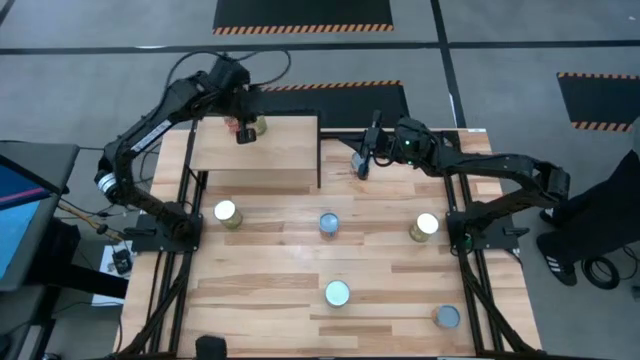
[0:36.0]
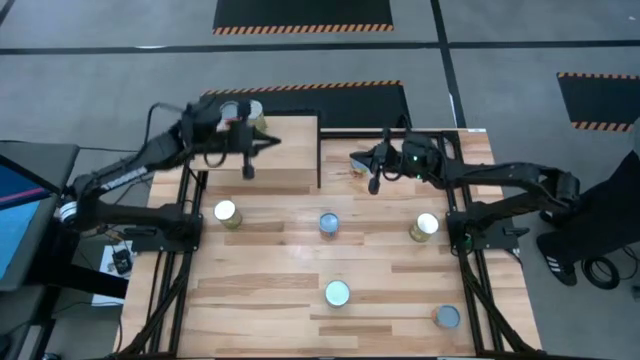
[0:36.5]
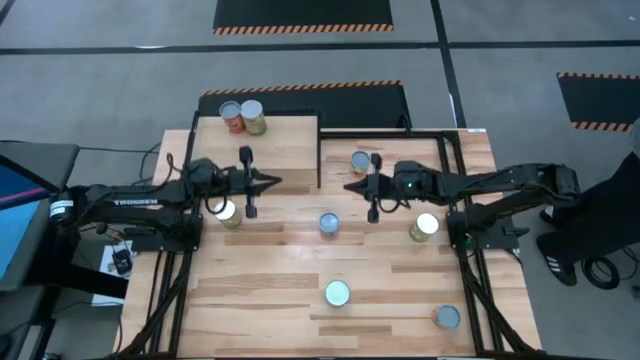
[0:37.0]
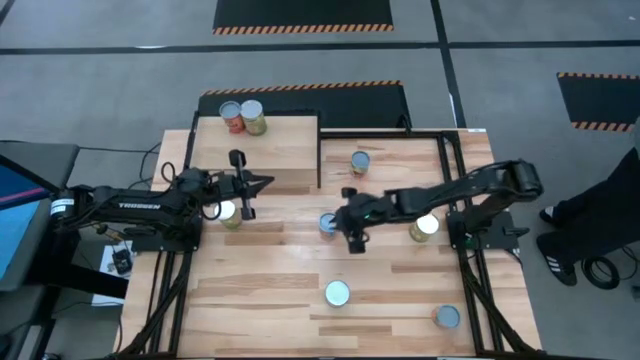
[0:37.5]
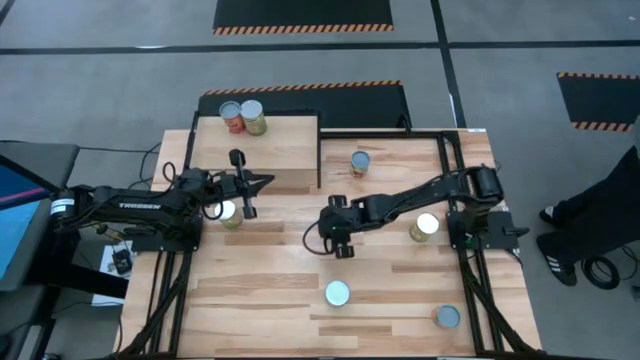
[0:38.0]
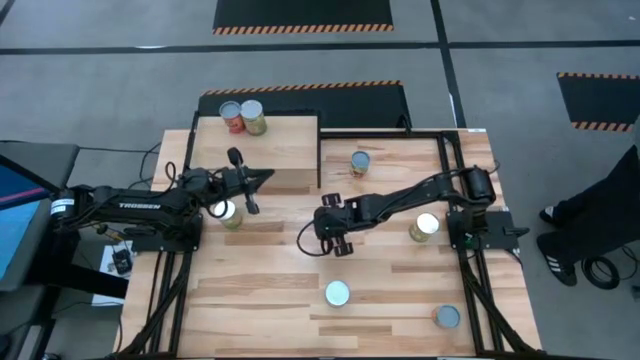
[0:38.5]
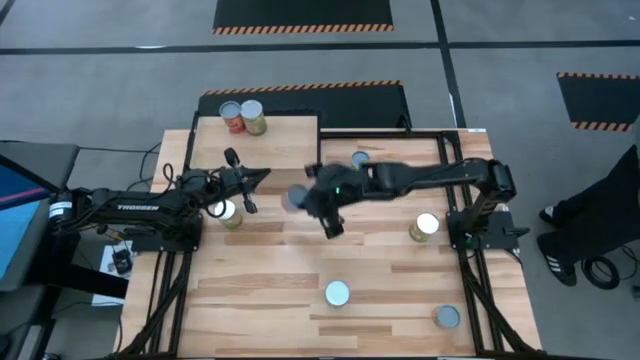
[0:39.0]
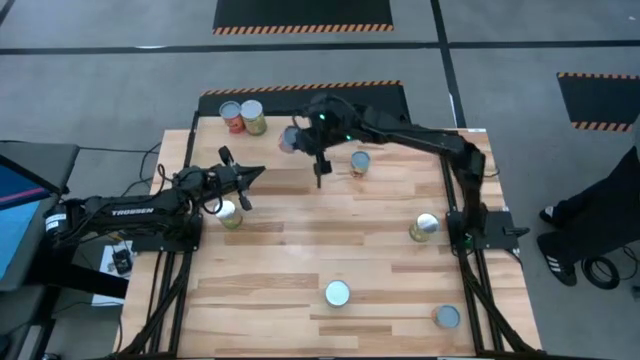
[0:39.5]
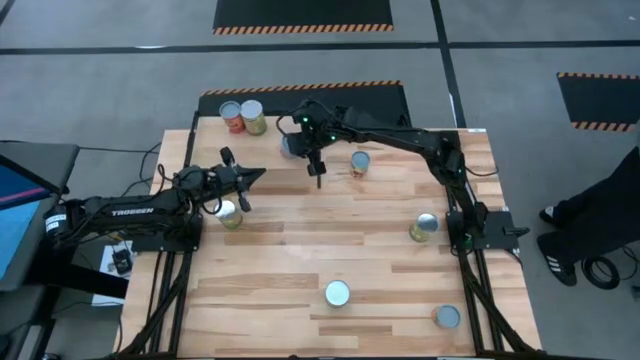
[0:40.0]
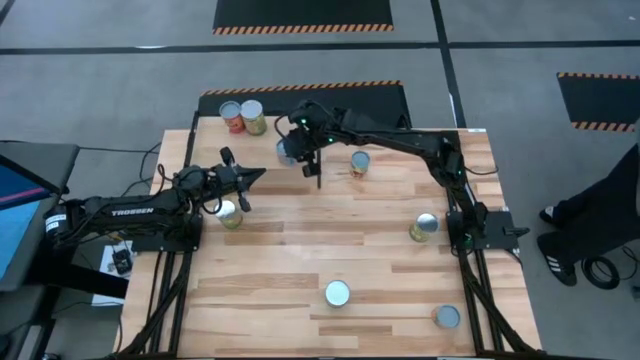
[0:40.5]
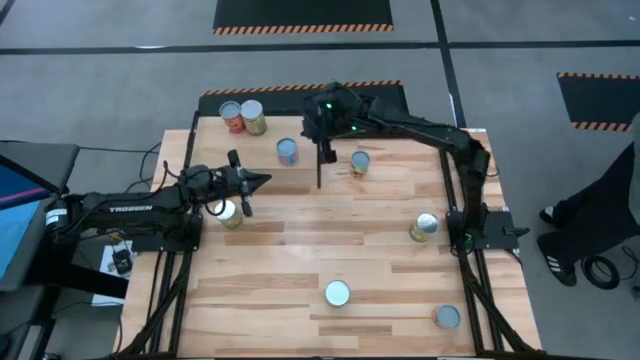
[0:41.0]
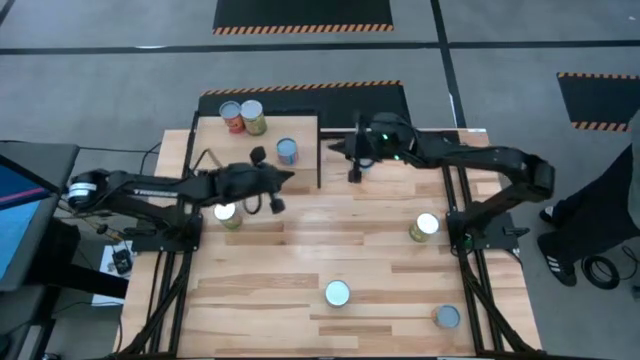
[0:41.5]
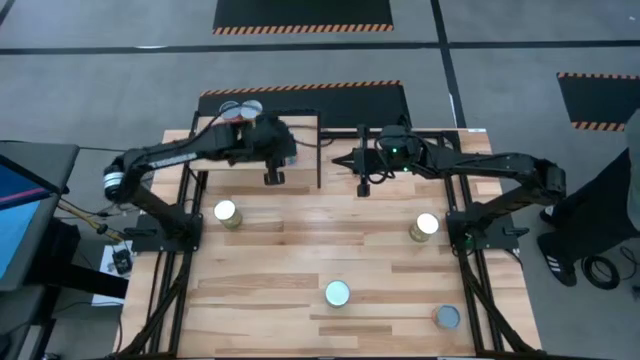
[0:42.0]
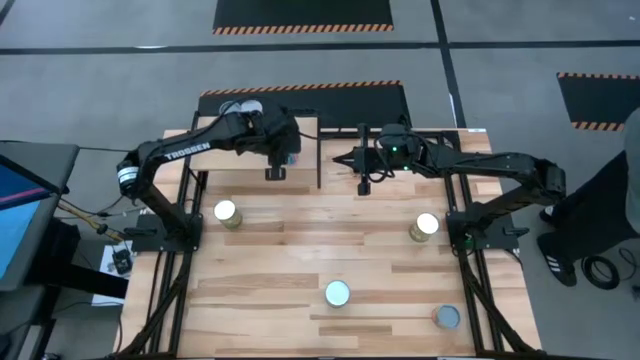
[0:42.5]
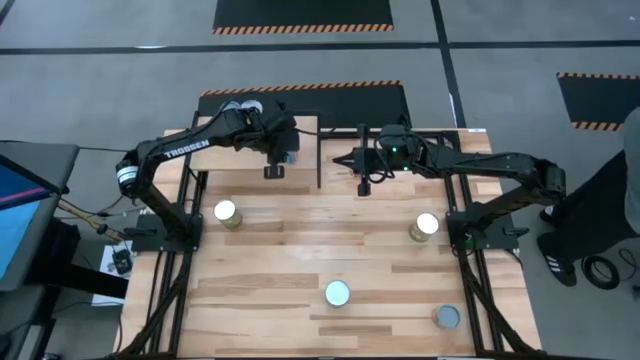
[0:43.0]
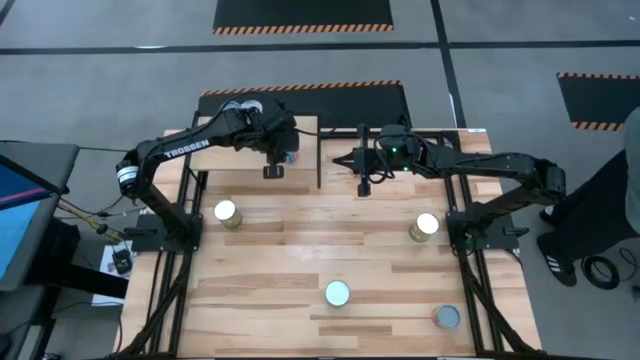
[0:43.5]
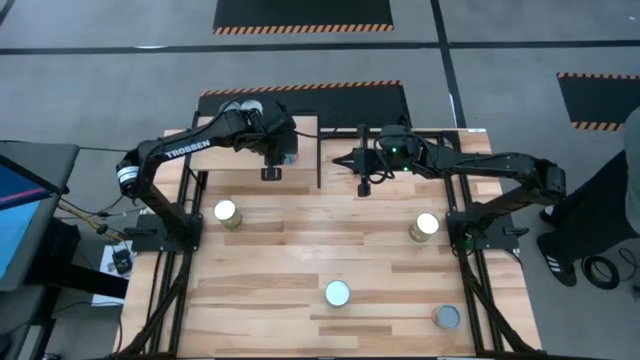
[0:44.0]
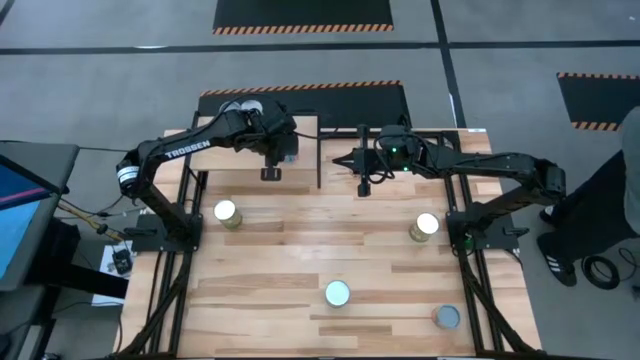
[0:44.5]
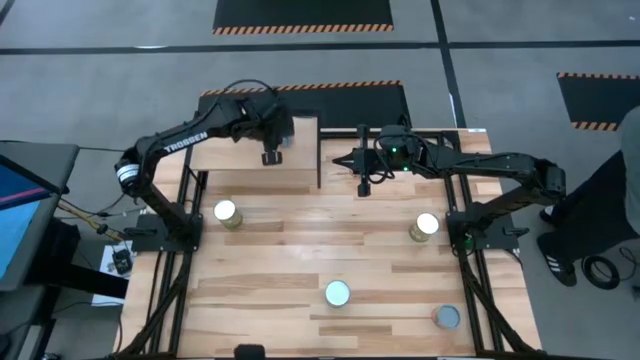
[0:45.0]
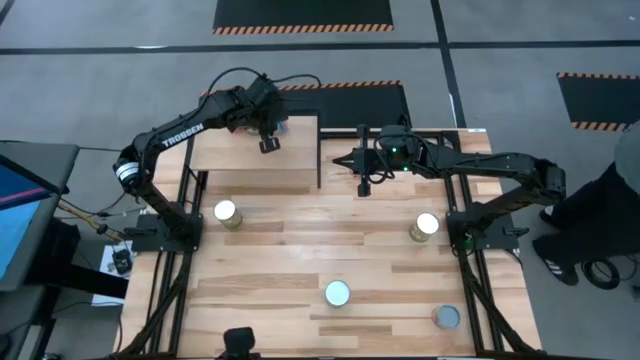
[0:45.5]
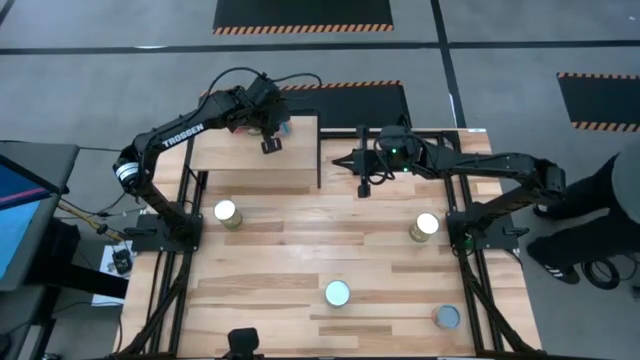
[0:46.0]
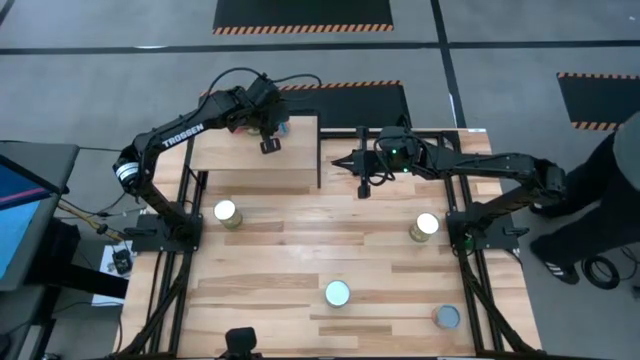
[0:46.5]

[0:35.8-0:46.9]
Task: Pick and place cans onto a shelf
Put the canned mixed corn on the shelf

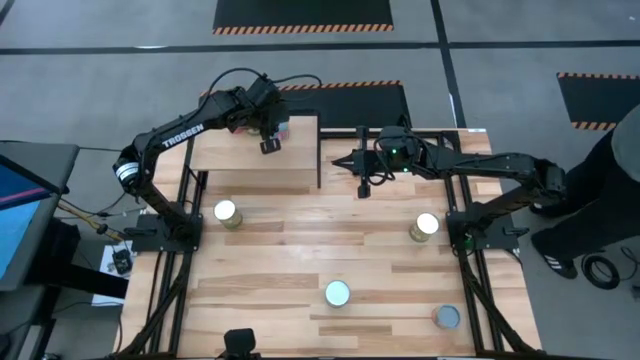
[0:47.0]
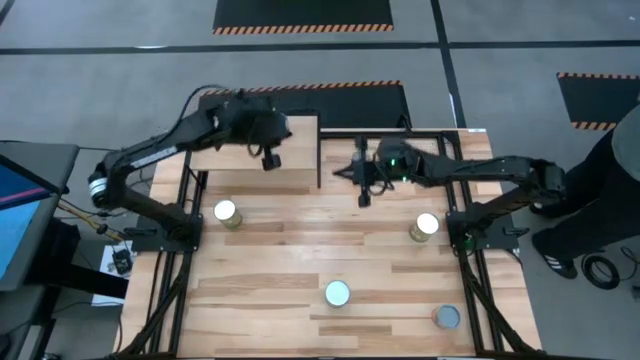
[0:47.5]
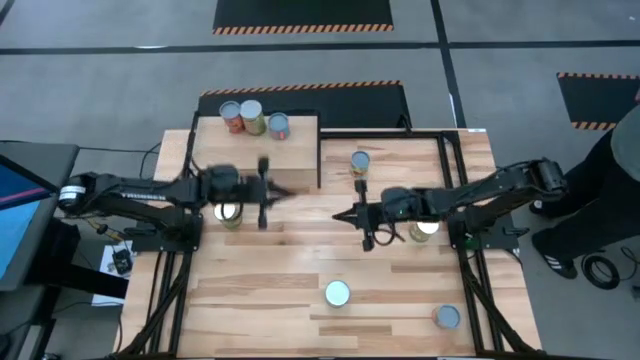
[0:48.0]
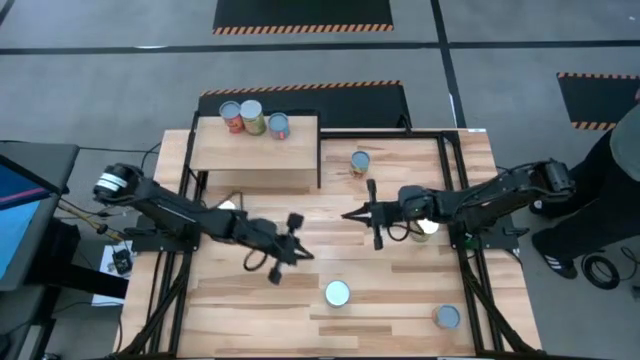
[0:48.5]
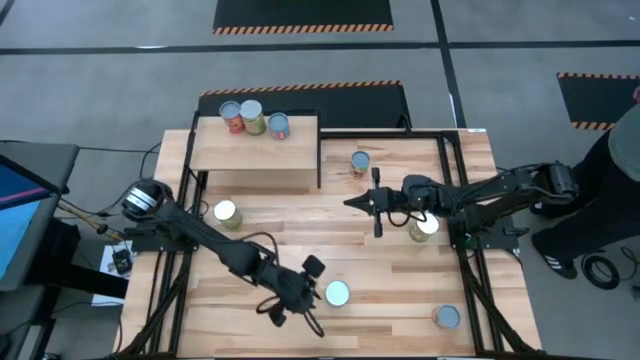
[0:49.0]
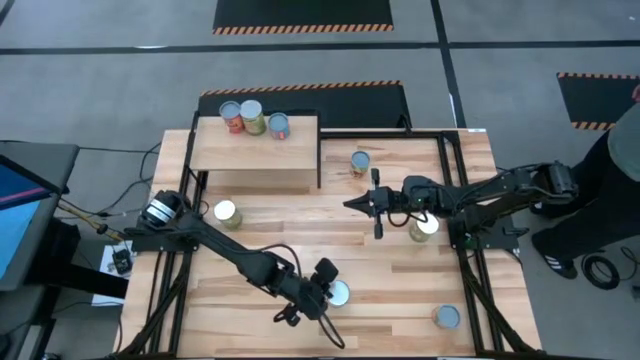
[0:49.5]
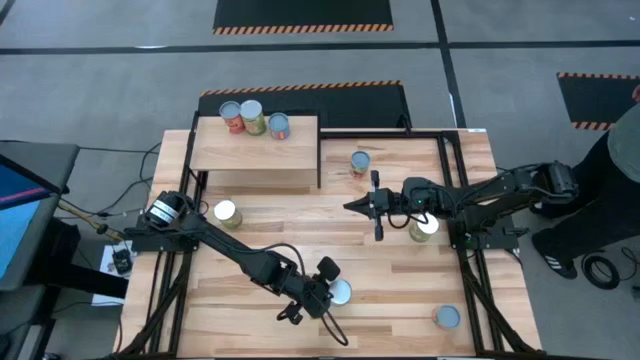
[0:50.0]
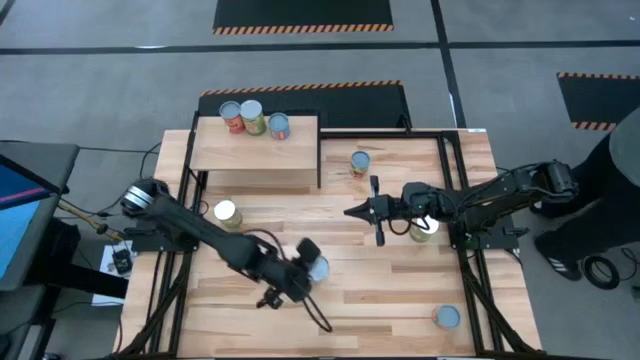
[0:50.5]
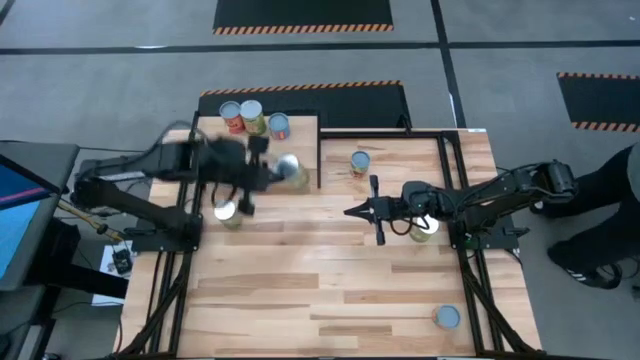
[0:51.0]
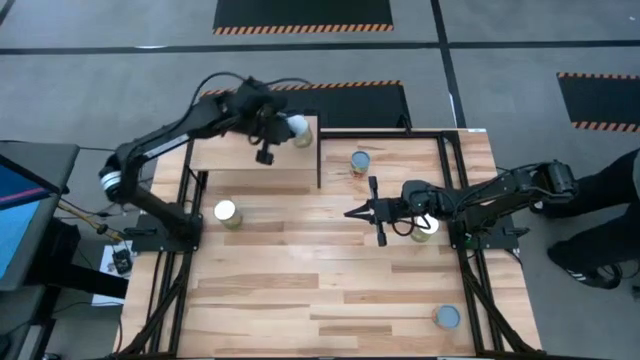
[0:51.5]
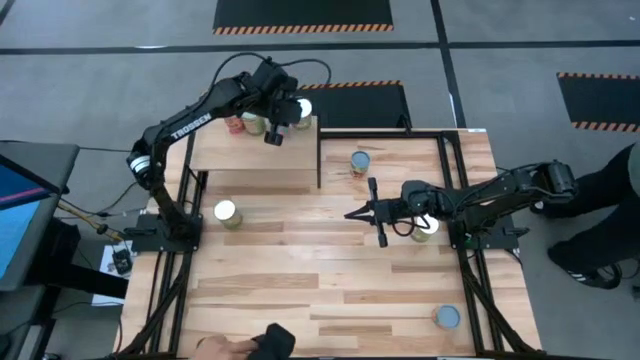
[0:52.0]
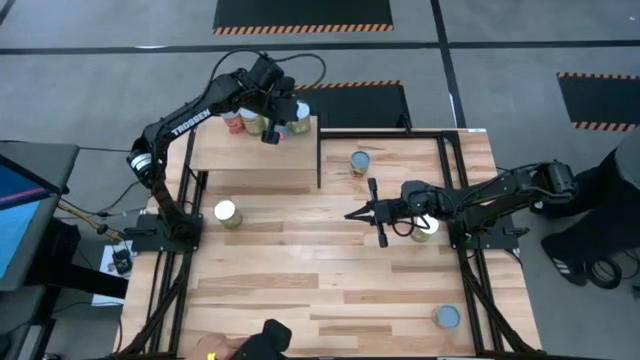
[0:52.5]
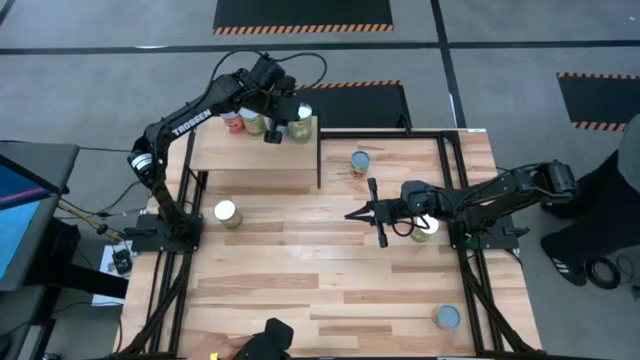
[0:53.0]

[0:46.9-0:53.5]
Put the bottom canned pears on the shelf

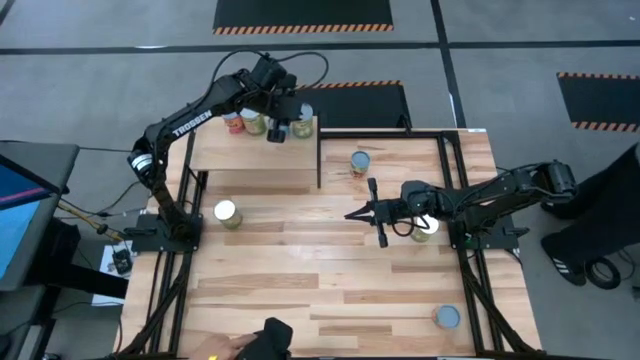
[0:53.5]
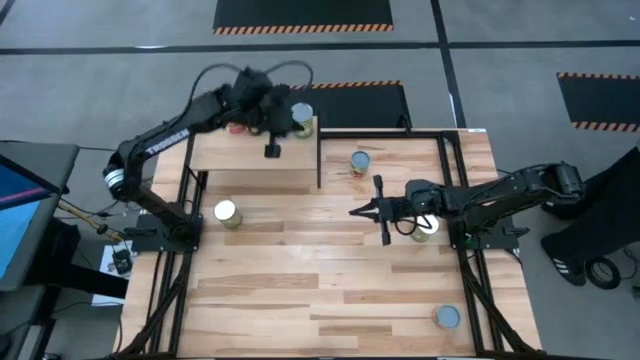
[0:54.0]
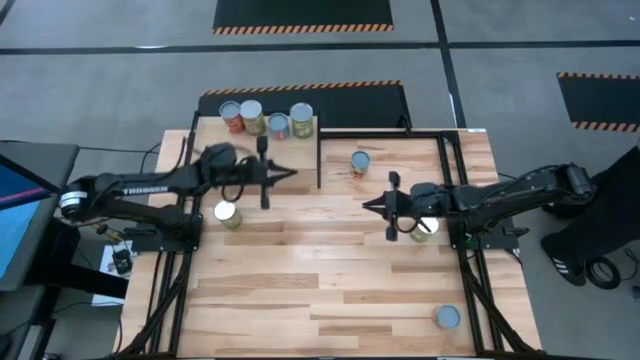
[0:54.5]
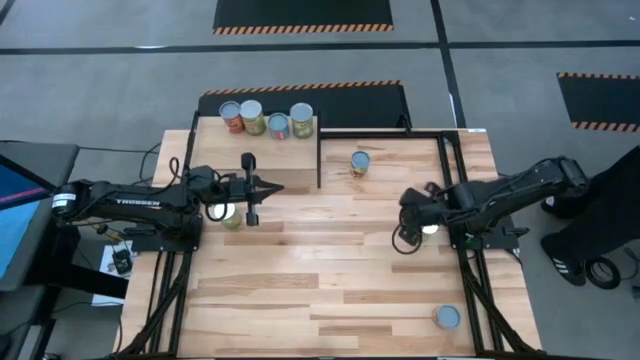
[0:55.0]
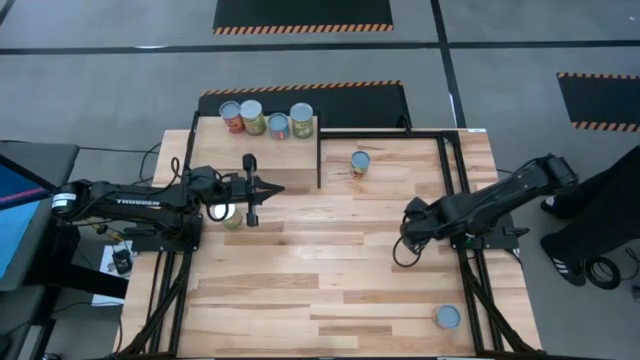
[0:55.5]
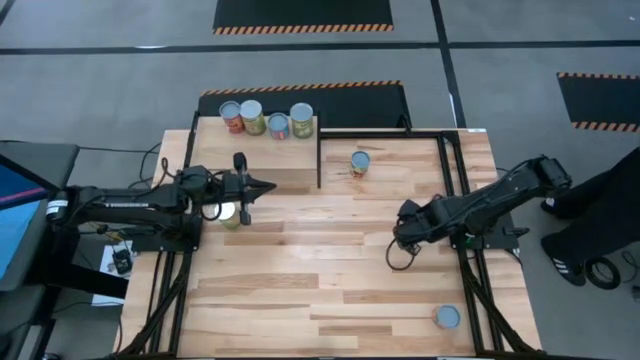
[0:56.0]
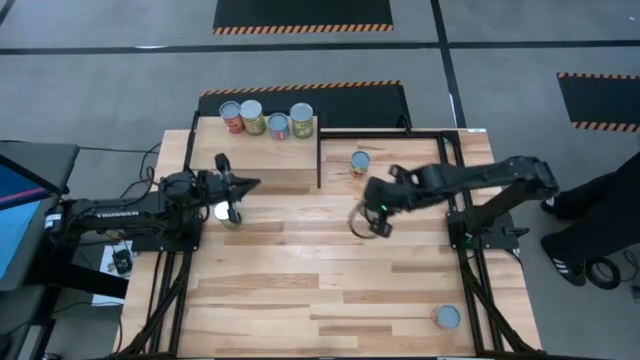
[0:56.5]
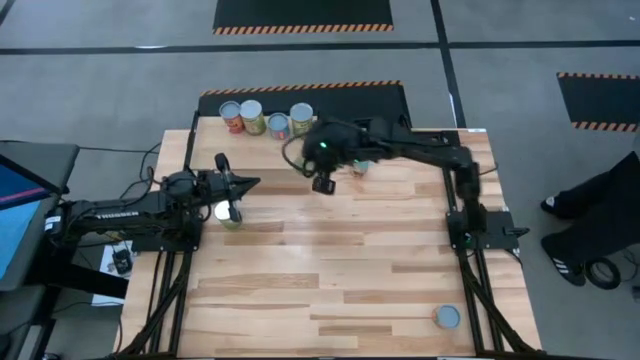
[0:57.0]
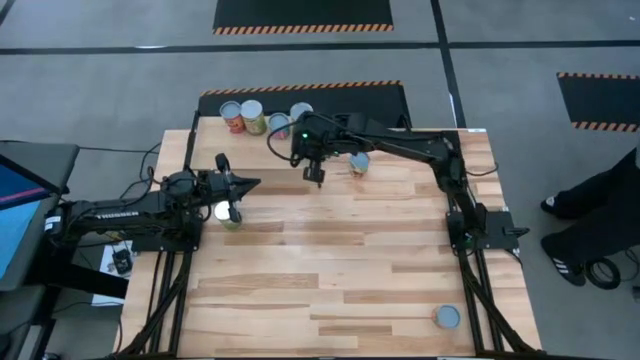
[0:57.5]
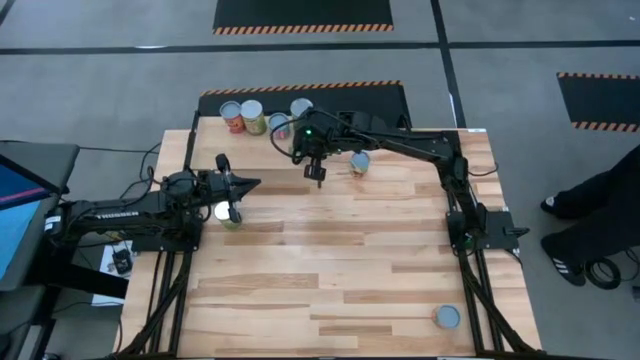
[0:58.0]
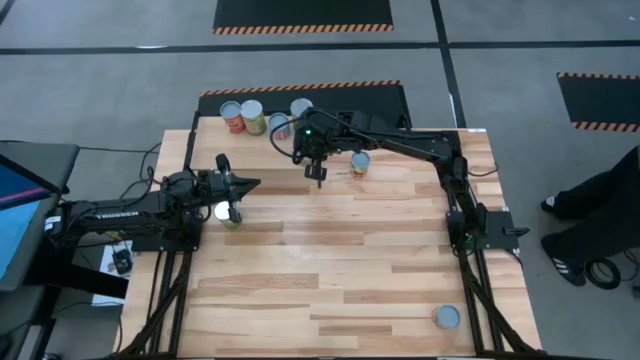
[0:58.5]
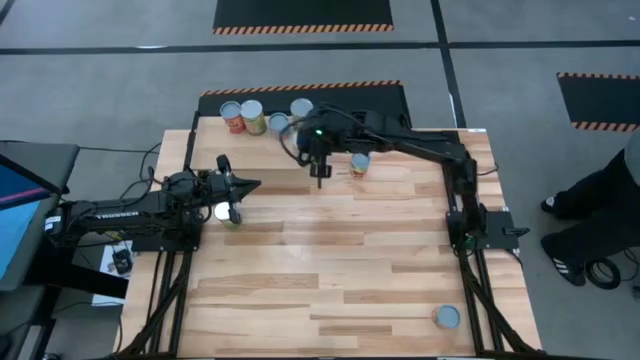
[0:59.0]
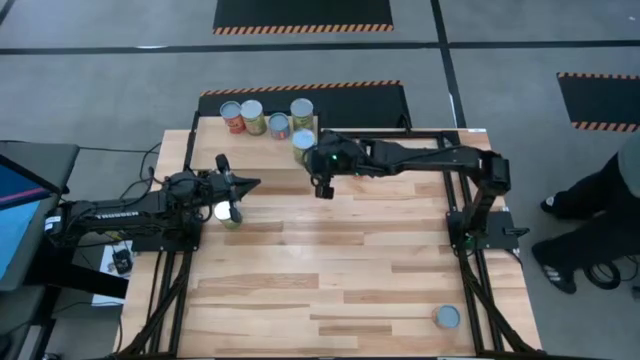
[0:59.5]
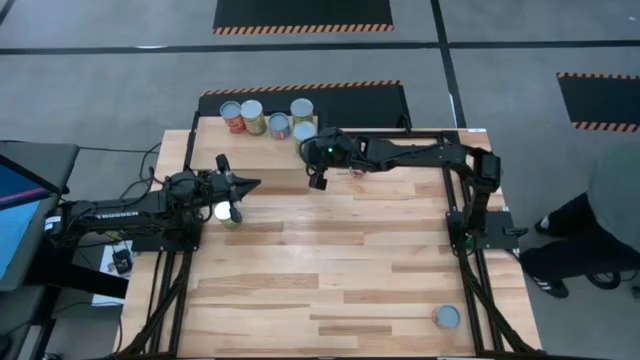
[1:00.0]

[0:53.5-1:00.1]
Put the canned pears on the shelf
